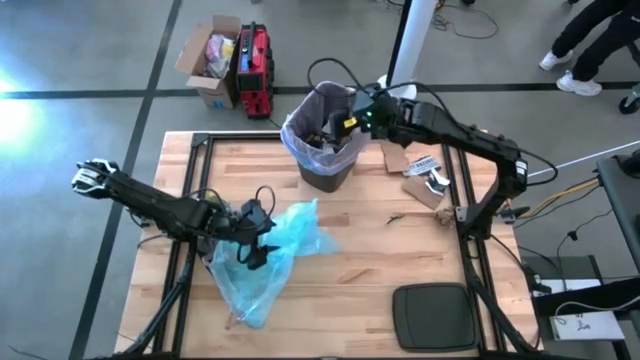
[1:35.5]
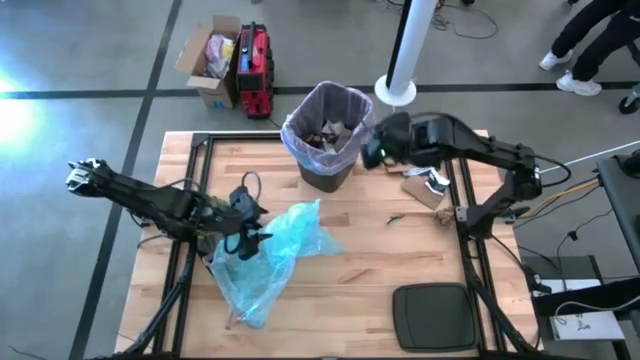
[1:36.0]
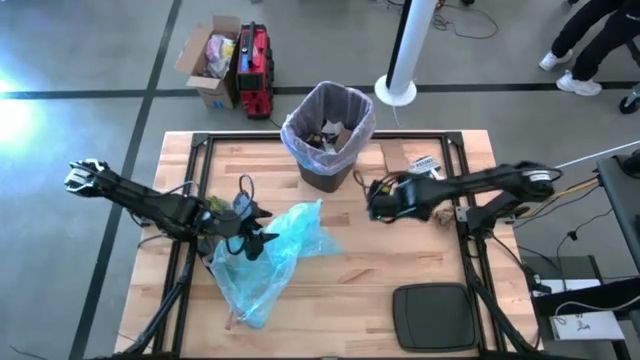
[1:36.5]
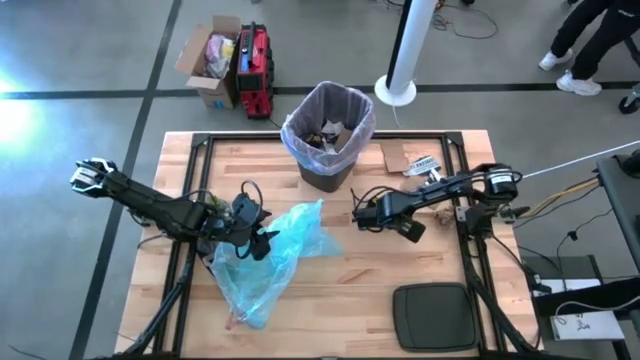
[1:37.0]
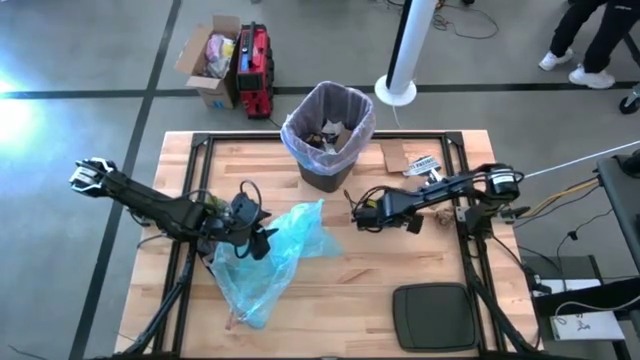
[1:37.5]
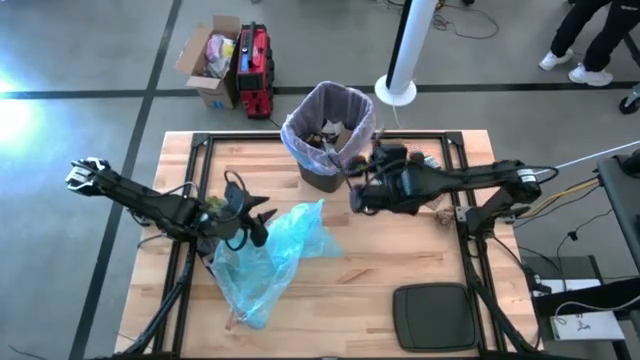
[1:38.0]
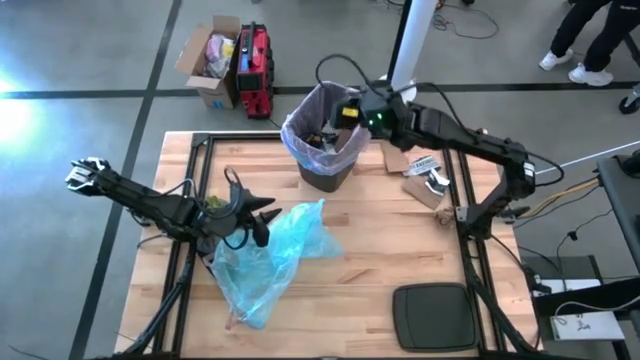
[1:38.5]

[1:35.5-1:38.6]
Task: place trash/remove bag and relplace
Put the zip-tied cables into the trash bin

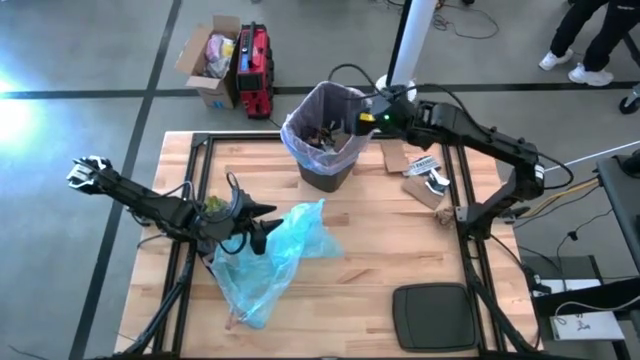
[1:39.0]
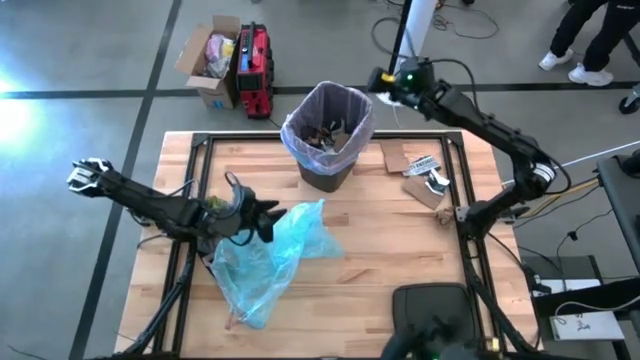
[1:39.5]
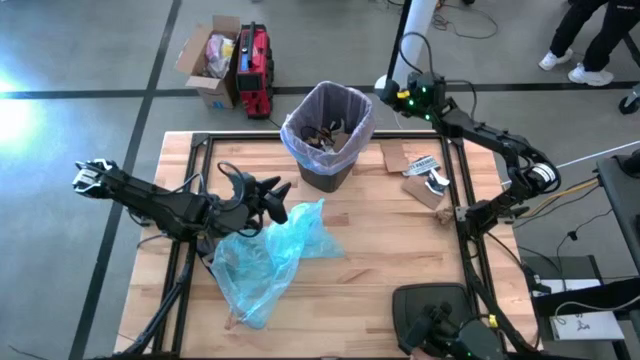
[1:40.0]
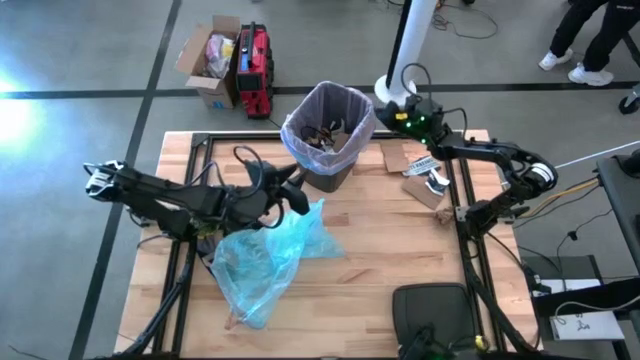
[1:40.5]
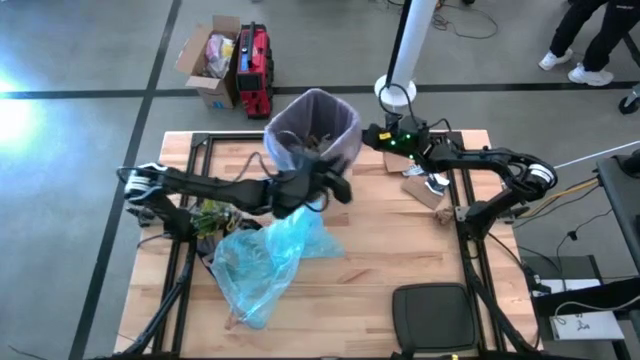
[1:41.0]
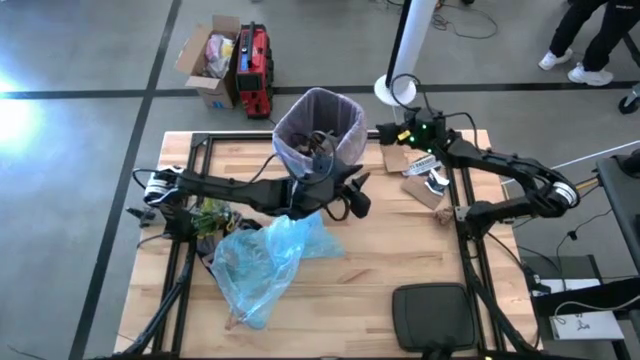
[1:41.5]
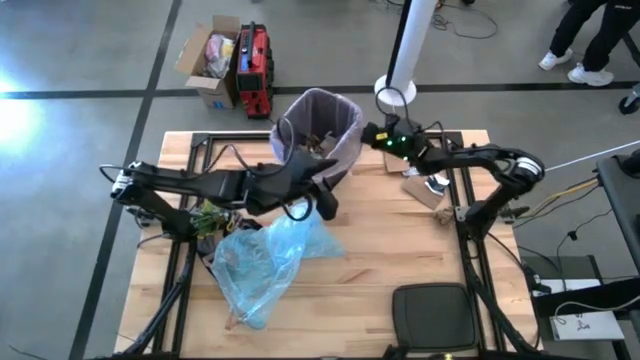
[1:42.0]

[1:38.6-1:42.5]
Adjust the trash bin

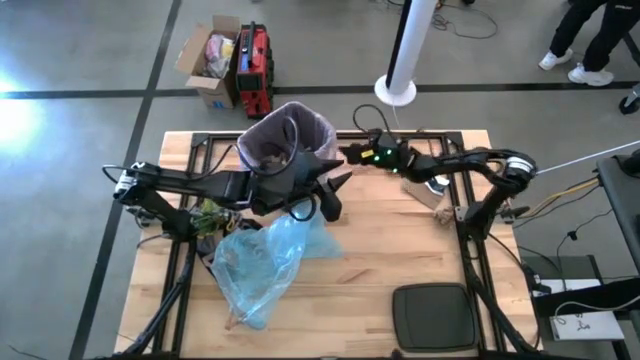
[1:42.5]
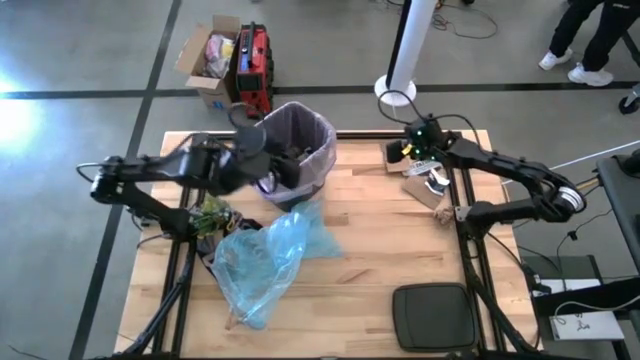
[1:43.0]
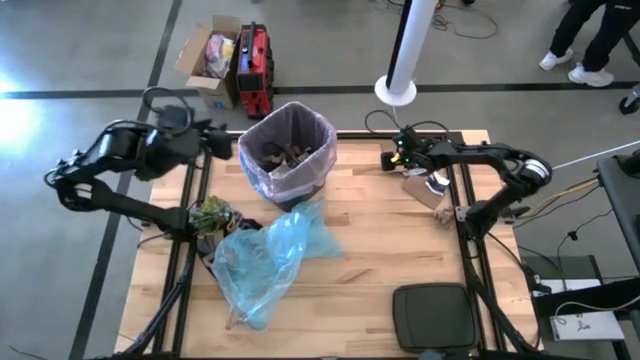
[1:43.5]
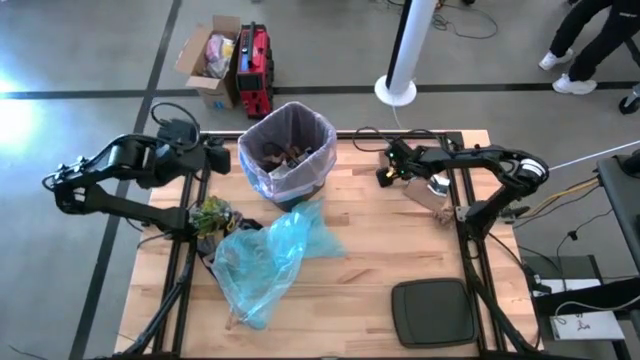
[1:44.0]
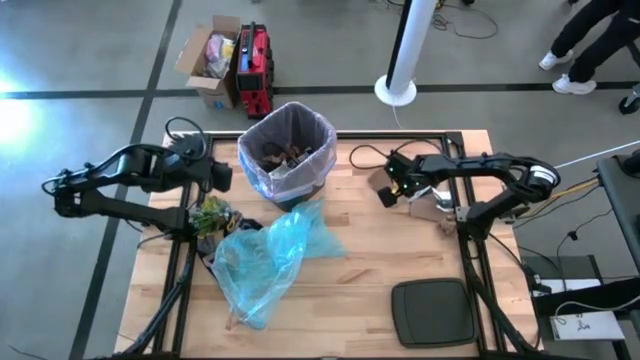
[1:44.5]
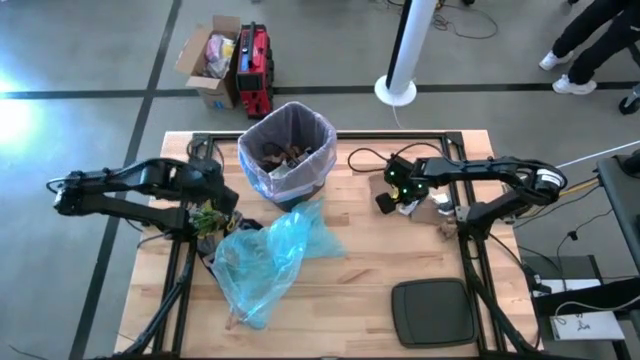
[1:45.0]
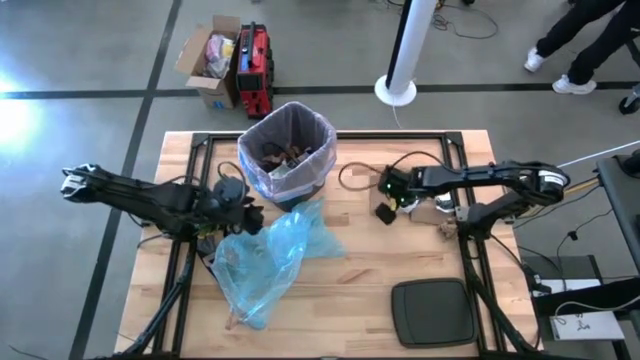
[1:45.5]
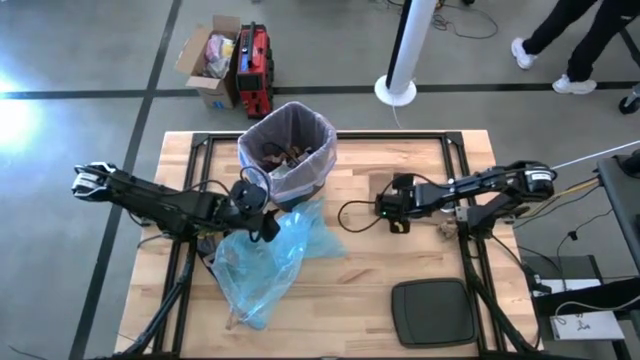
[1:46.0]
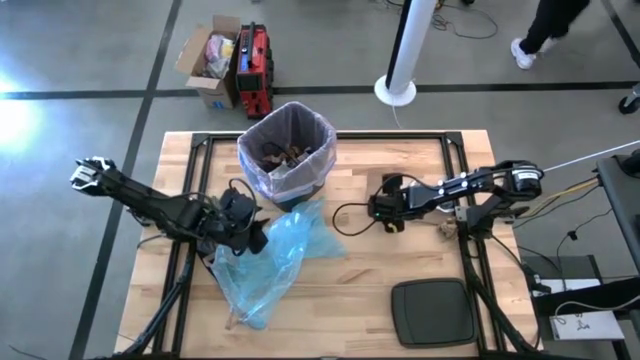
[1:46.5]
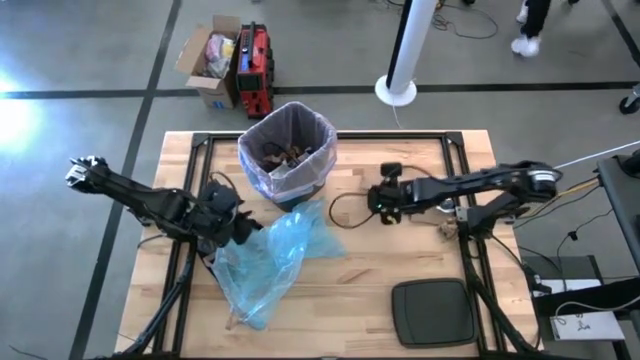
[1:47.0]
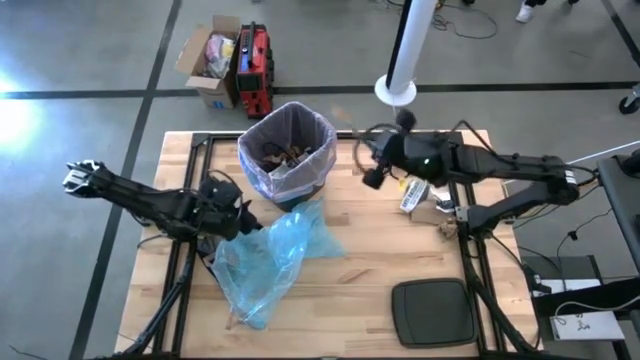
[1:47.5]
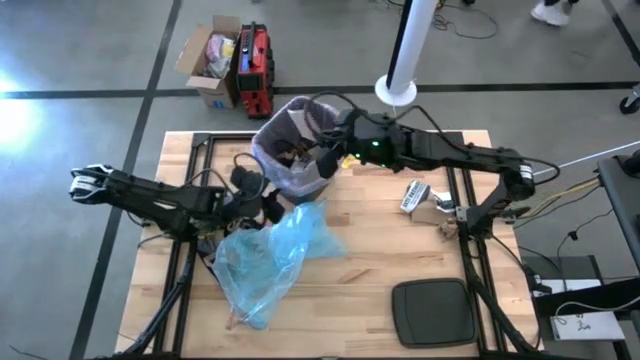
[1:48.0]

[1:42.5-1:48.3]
Put the brown cardboard into the trash bin

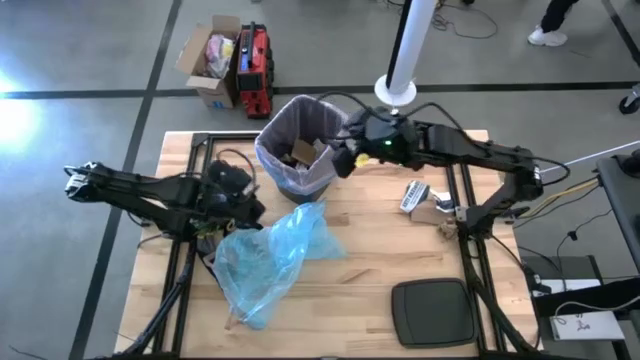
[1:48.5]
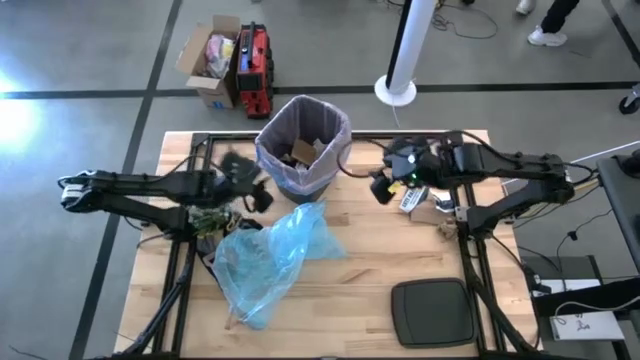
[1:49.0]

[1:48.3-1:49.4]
Adjust the trash bin

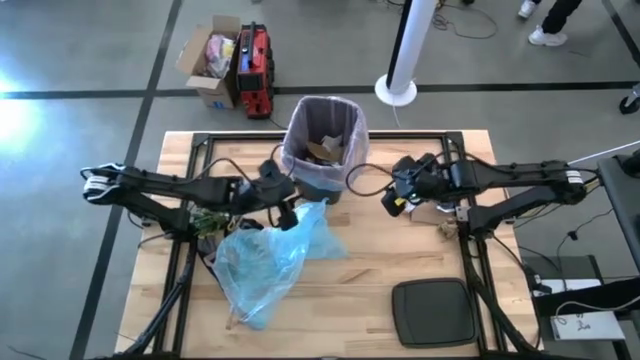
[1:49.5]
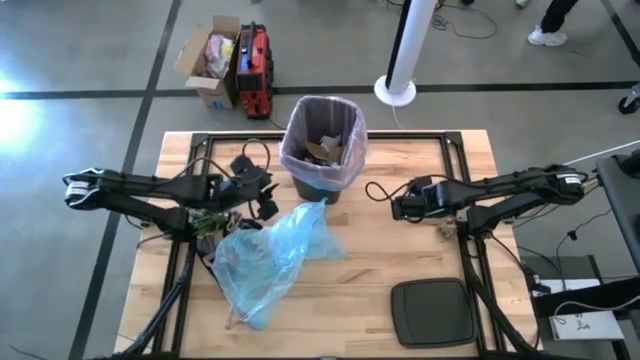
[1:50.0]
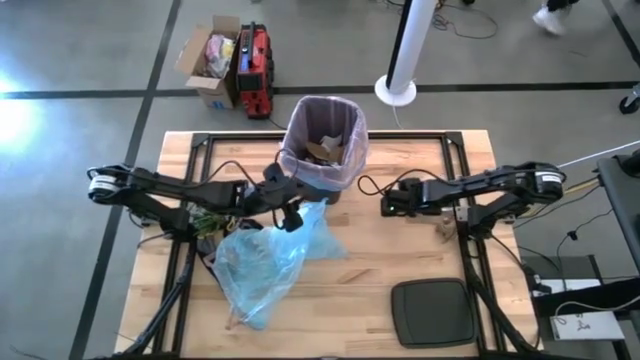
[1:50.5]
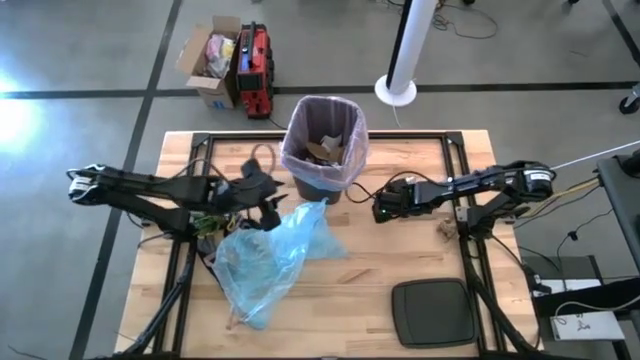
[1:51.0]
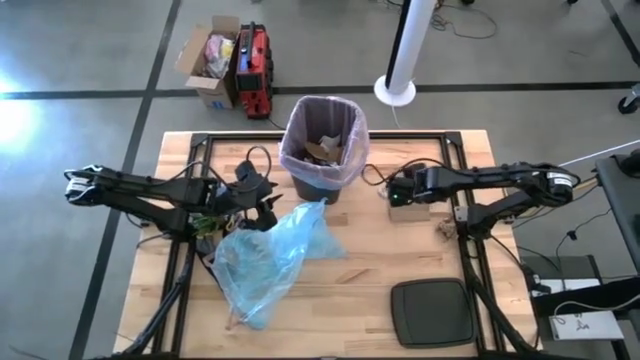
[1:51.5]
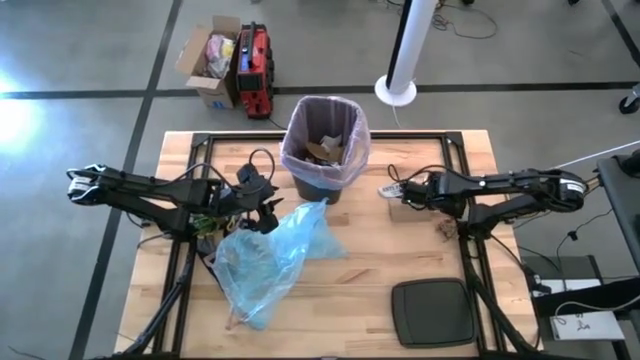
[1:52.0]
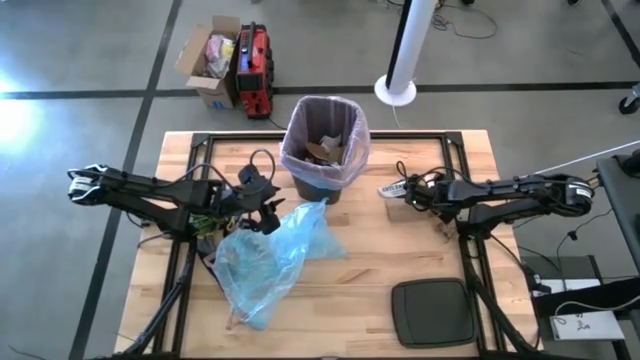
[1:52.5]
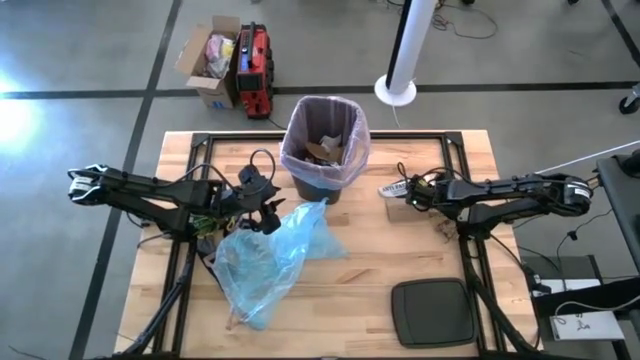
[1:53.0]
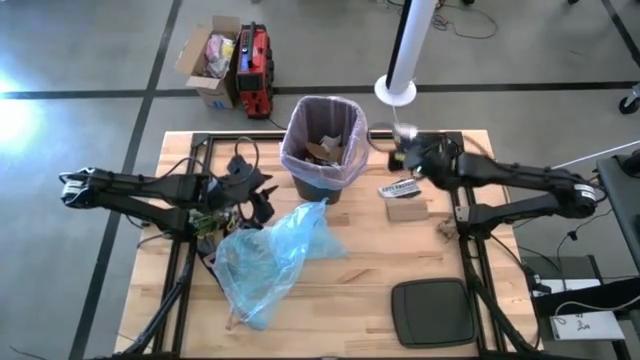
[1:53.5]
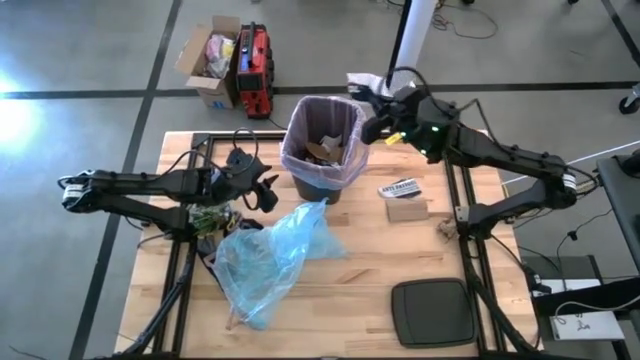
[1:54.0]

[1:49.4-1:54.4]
Put the white paper into the trash bin

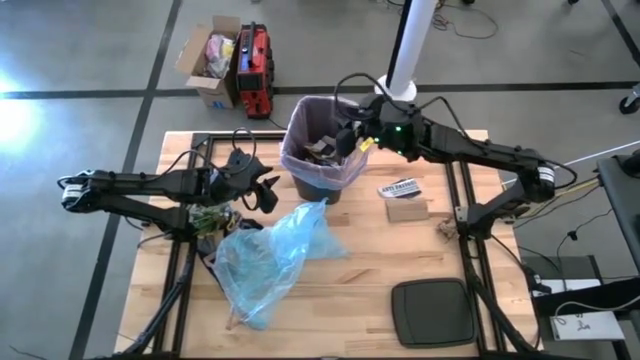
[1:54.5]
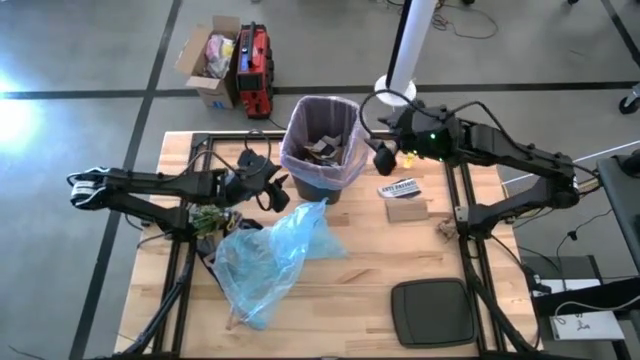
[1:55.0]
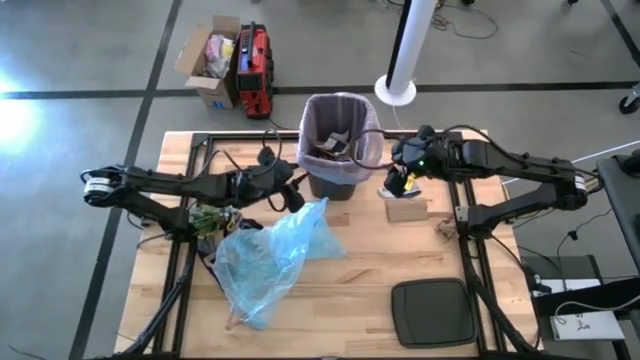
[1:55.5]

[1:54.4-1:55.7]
Adjust the trash bin
